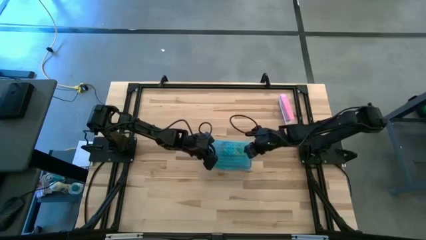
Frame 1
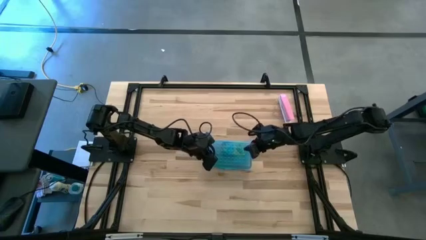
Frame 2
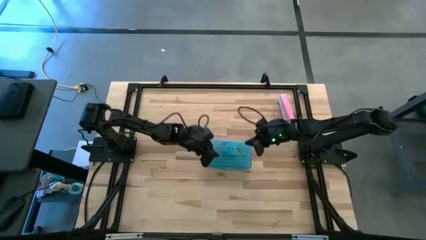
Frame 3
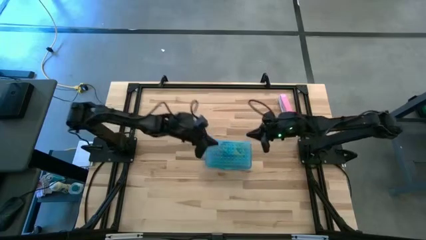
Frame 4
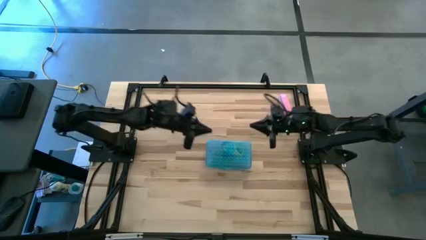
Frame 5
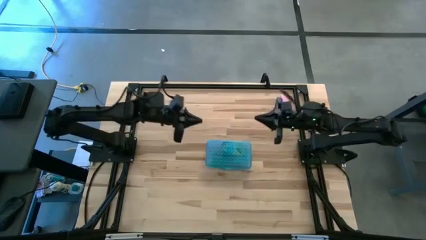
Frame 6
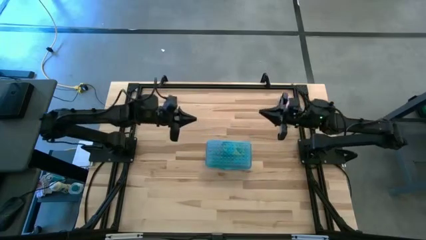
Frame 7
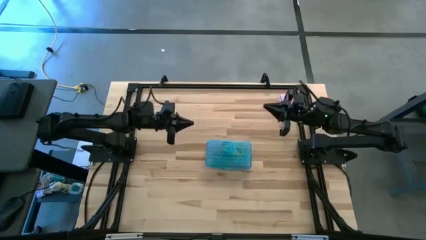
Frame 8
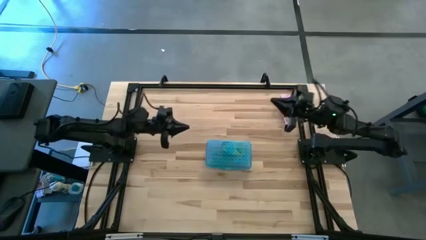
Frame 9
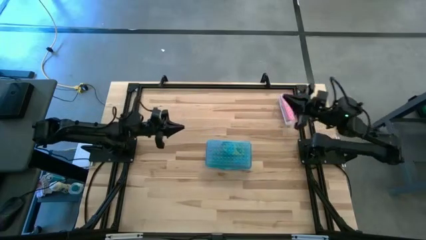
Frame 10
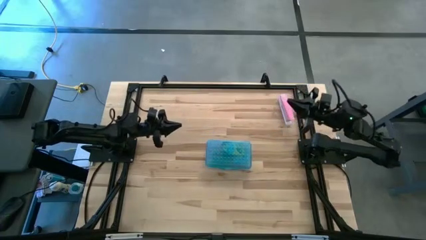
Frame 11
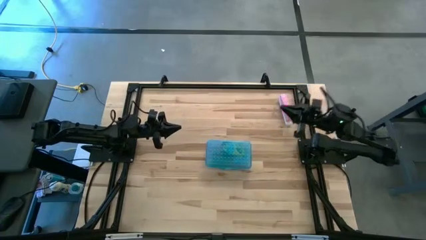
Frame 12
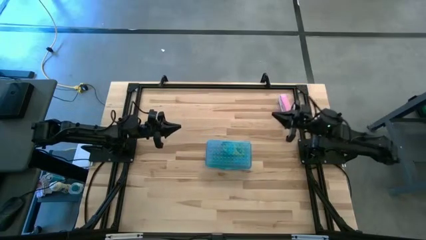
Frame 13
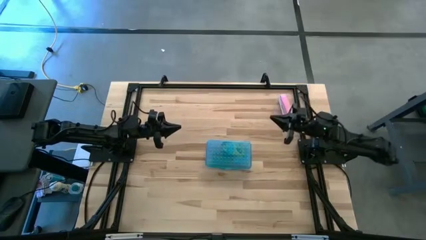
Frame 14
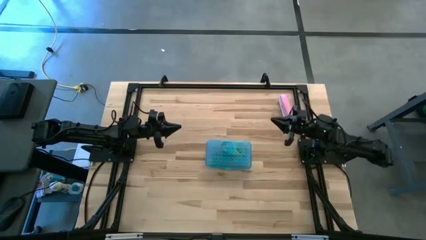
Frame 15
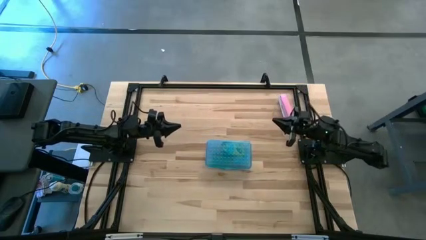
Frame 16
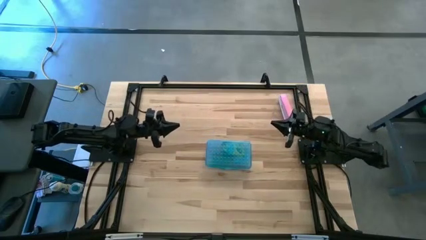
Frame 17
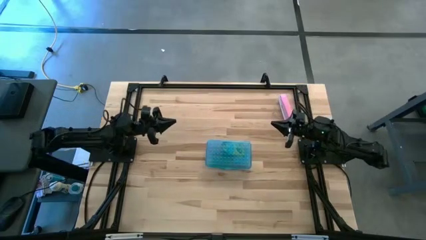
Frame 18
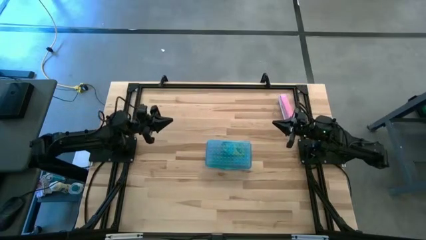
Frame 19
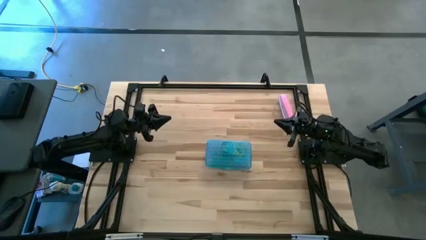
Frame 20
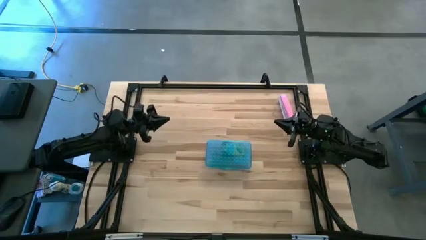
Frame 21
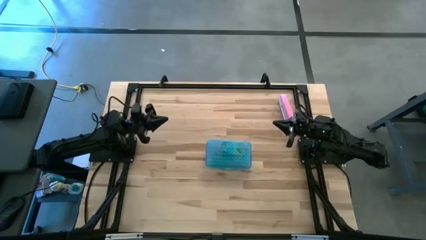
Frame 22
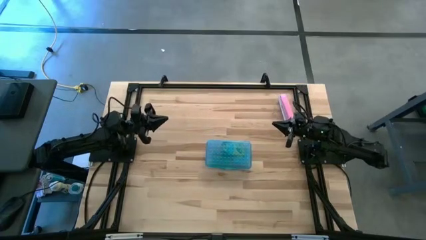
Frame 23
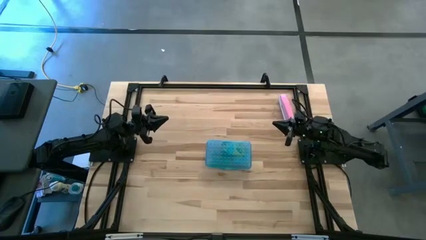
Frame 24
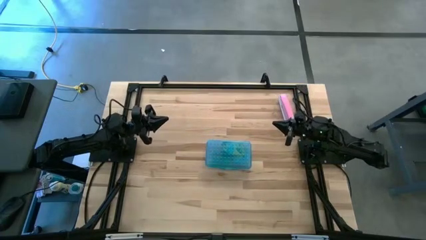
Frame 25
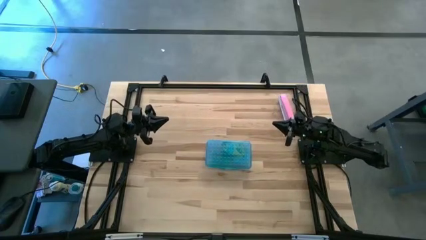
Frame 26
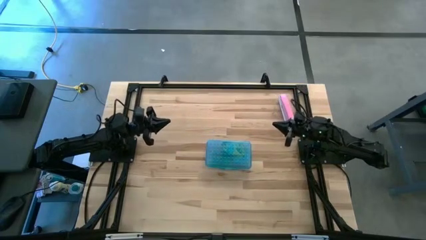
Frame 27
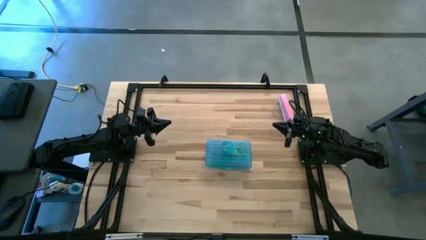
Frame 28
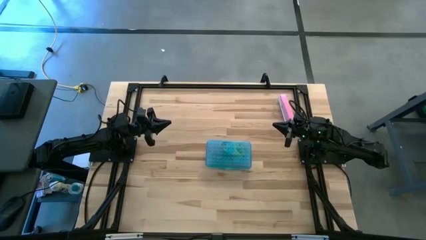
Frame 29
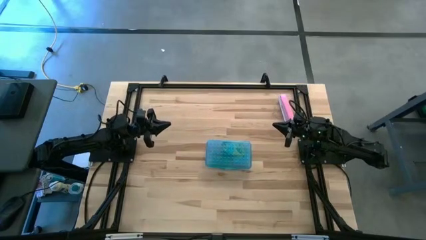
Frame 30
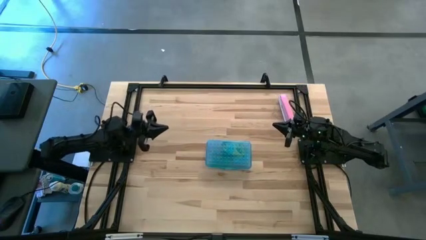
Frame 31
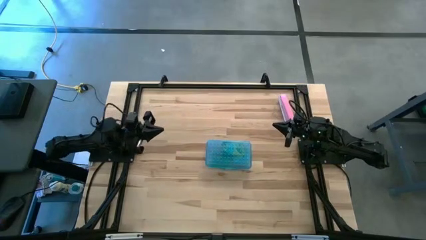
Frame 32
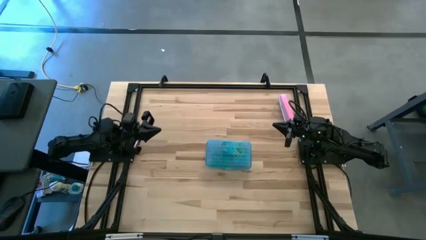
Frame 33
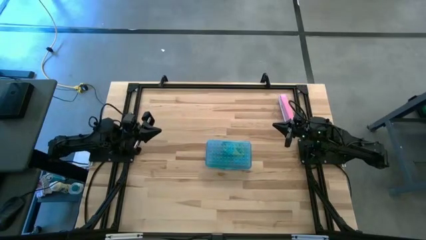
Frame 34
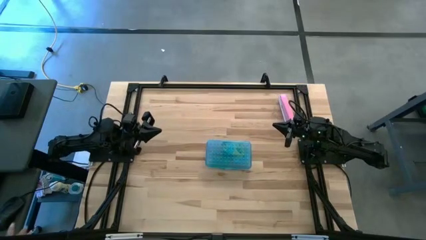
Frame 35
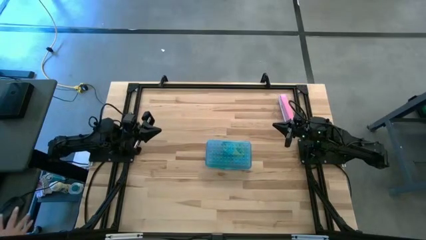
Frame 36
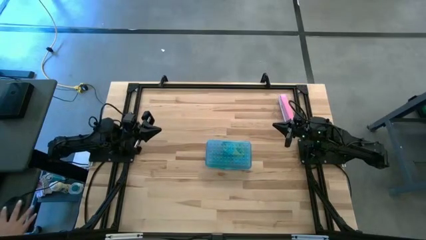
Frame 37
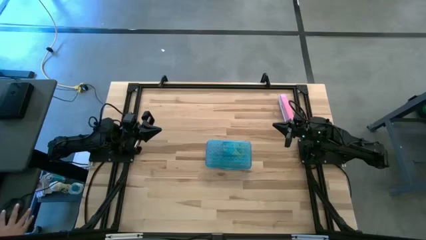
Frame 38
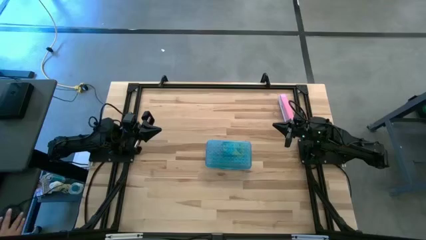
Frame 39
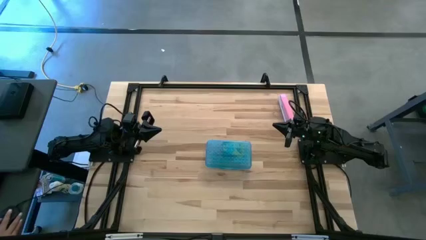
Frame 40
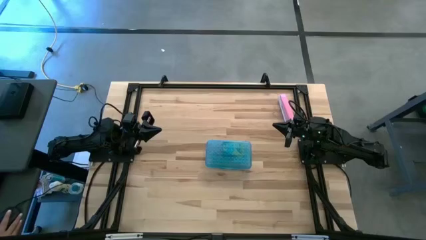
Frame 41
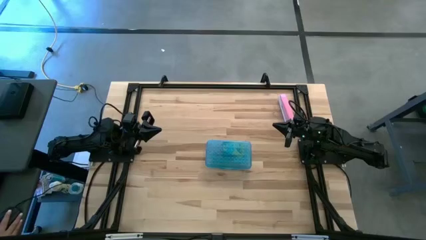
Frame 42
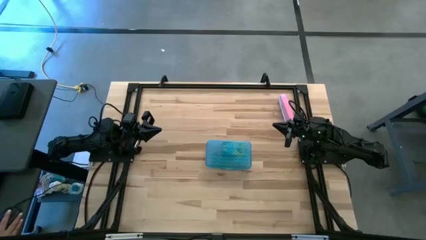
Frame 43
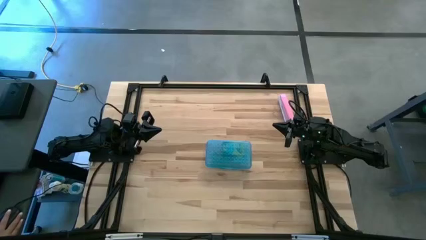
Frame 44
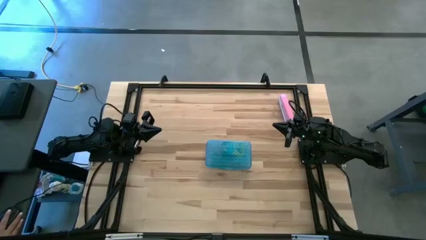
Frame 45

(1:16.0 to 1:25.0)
Task: Pack school essentials
Return to Home Position

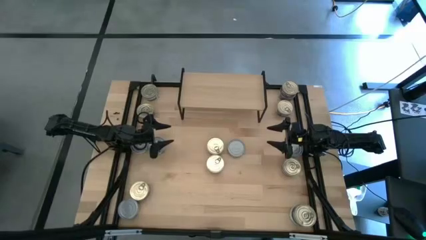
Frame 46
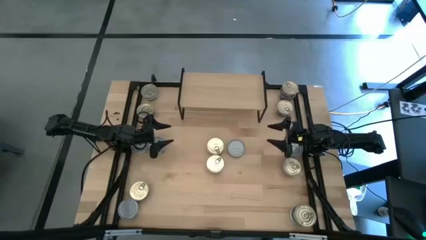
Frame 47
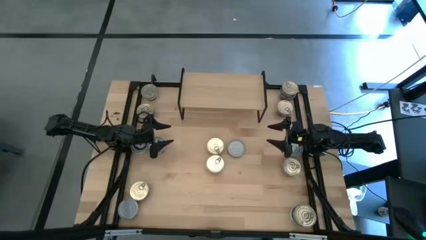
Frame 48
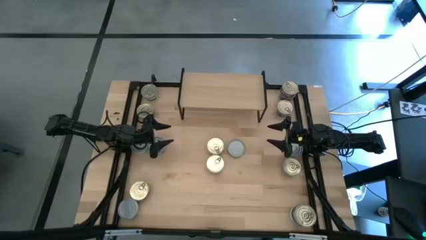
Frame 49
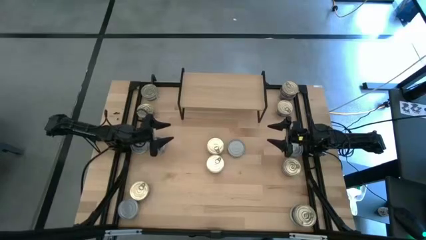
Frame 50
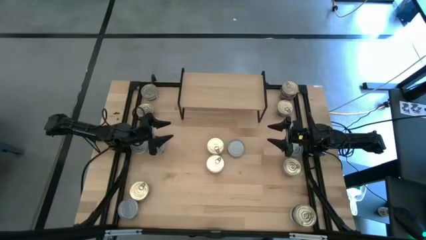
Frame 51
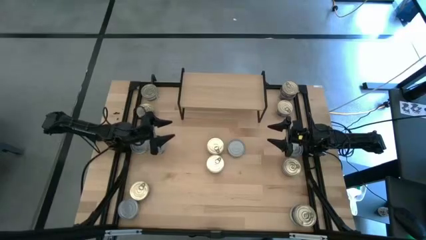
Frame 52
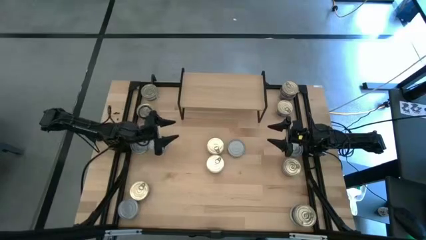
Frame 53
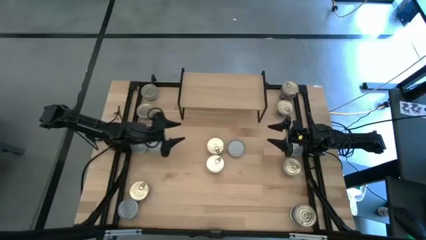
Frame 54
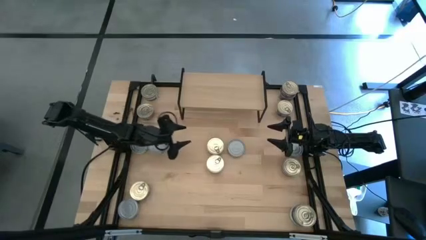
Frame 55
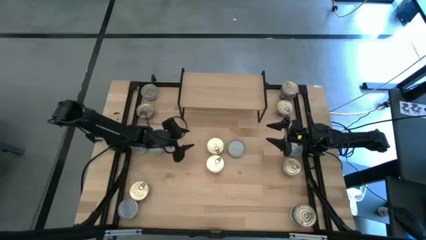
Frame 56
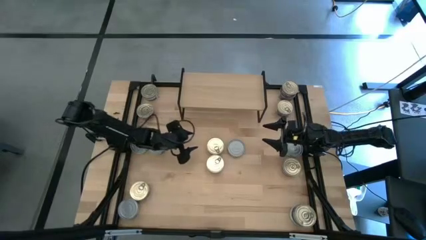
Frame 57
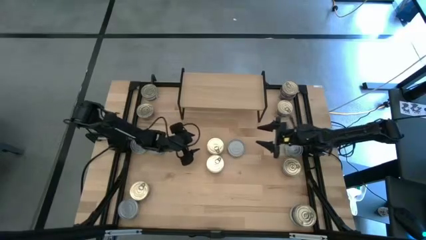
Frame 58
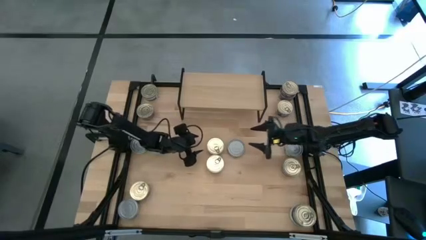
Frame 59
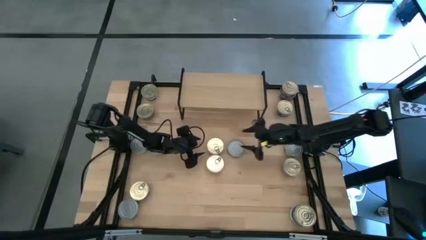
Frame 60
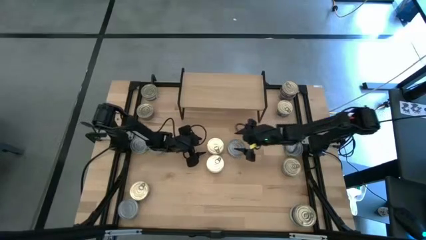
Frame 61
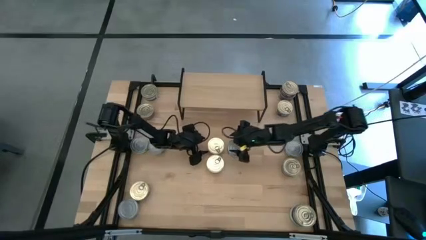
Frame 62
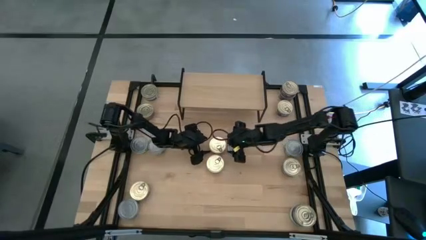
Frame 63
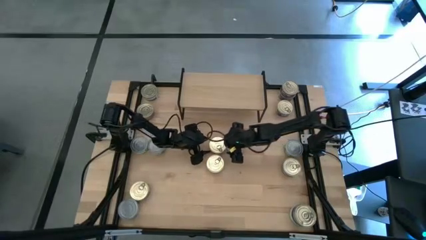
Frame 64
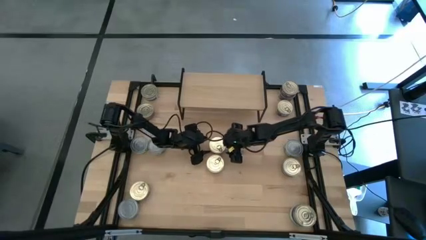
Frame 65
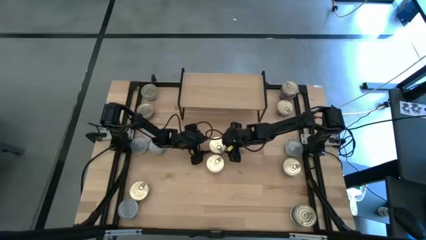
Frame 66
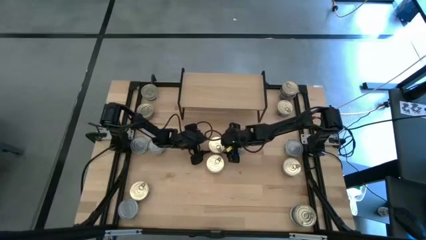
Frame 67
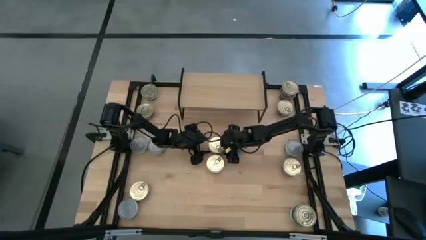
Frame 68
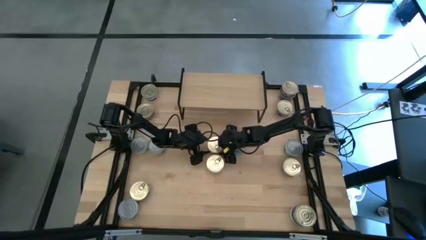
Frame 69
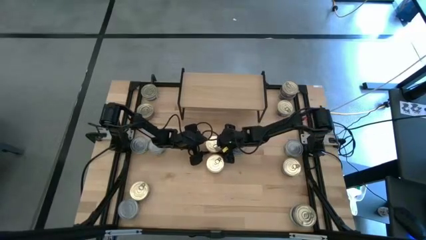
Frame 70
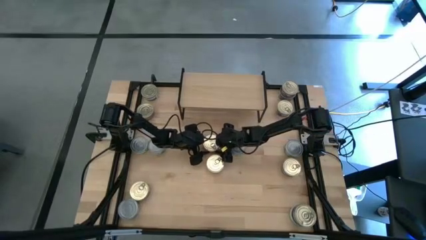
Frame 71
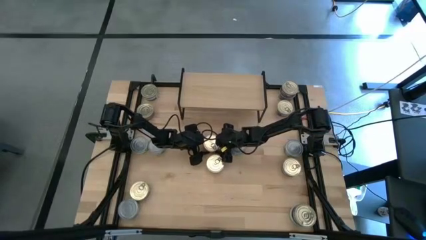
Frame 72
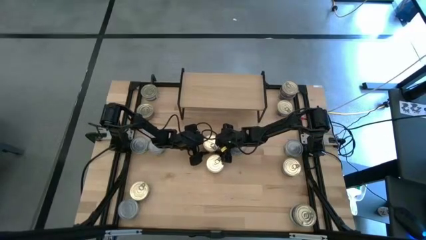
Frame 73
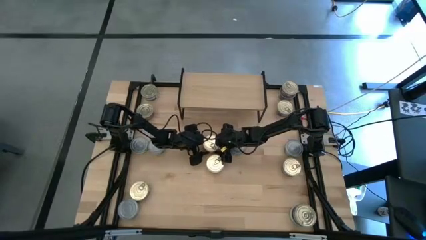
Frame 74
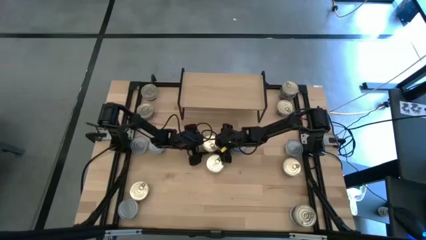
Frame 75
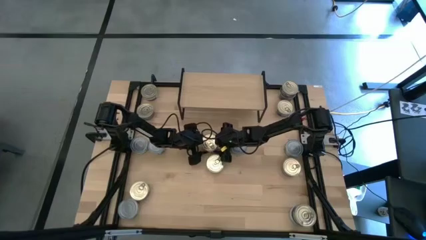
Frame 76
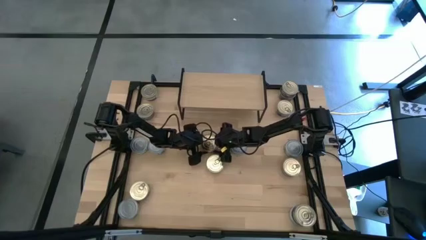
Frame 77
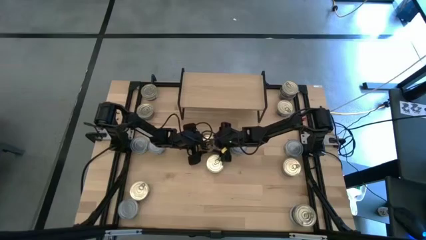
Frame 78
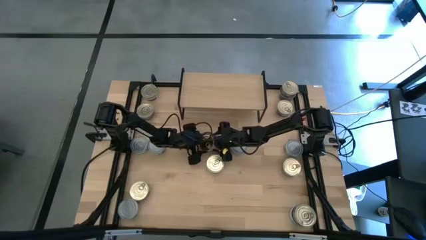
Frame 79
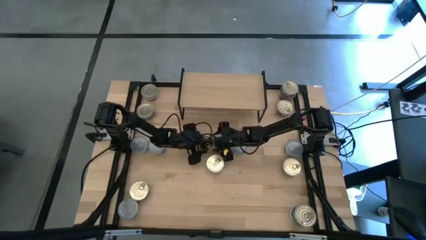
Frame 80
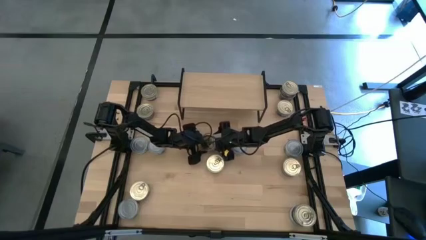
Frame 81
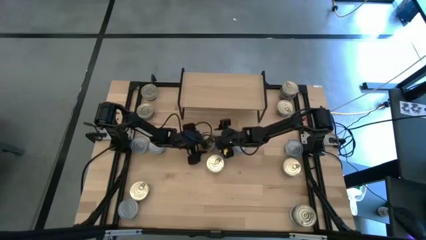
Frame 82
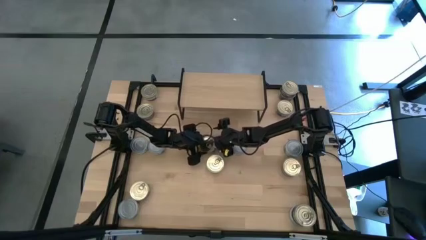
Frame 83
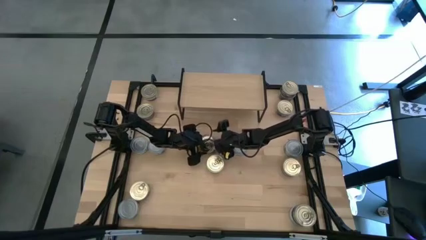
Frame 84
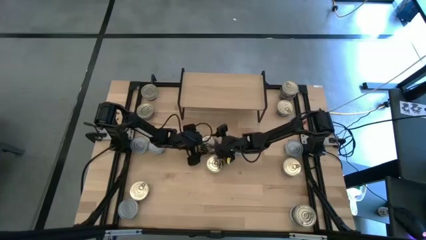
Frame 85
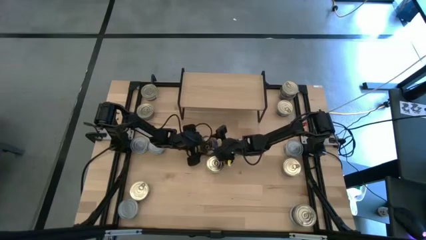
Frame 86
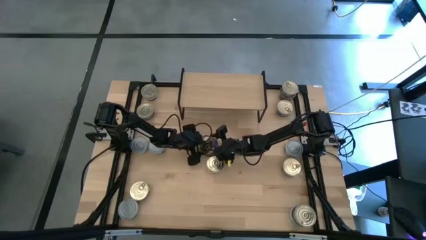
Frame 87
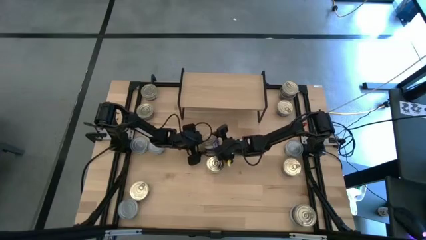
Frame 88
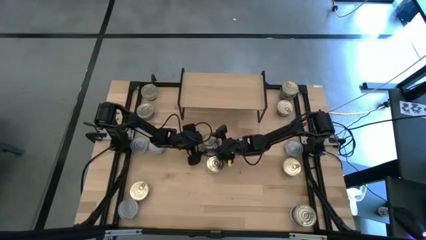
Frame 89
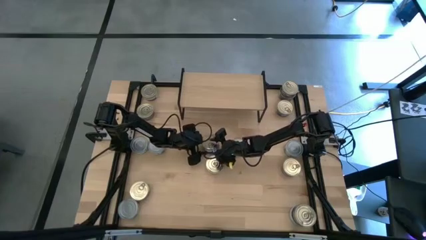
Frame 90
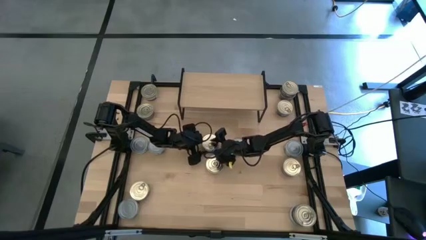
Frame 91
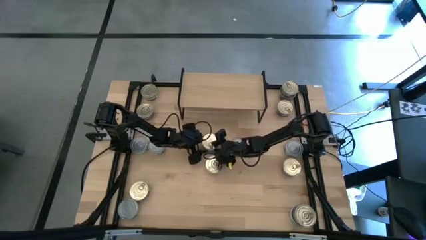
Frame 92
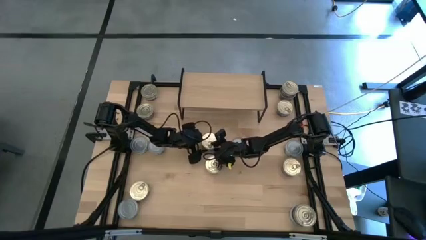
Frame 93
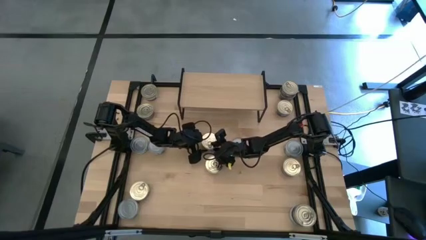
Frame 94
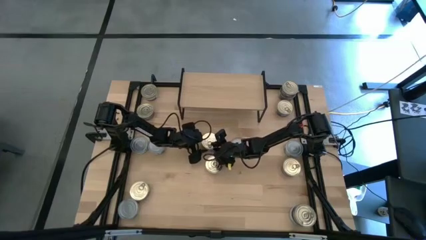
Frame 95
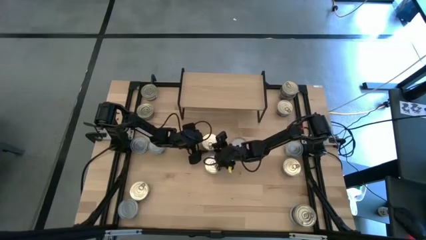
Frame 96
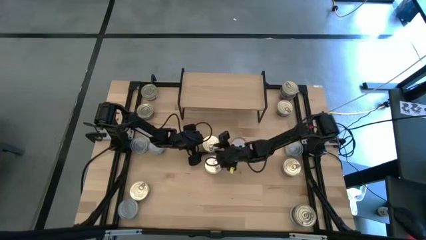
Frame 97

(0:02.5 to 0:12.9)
Task: Stack canned seafood by type on shelf
Put the blue pink tuna can on the shelf
